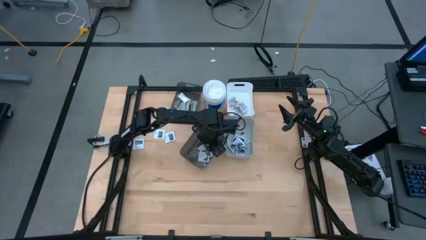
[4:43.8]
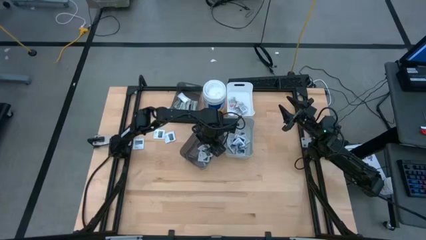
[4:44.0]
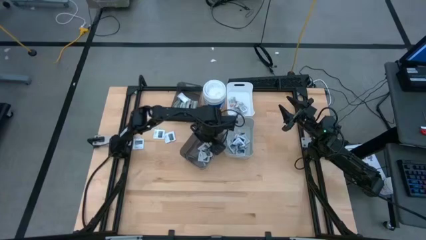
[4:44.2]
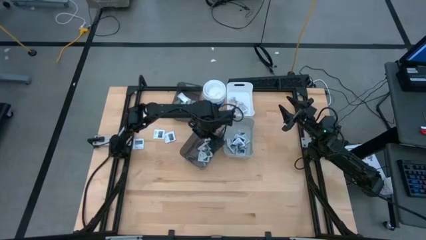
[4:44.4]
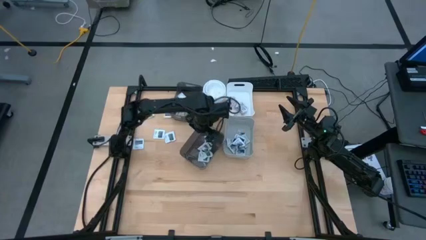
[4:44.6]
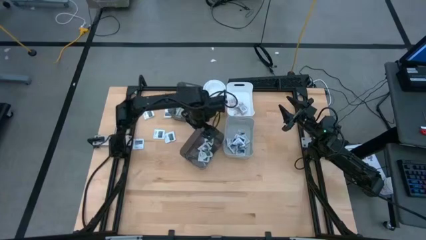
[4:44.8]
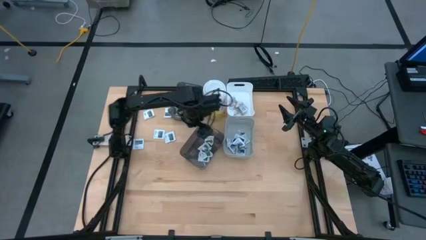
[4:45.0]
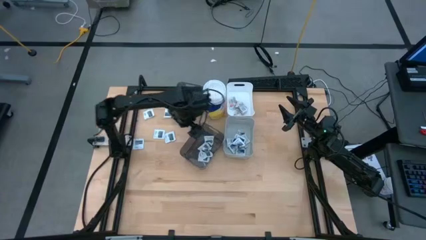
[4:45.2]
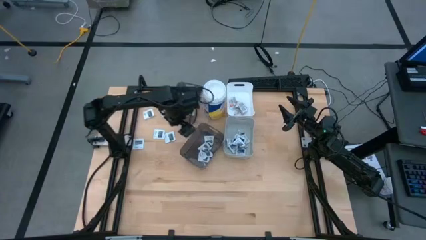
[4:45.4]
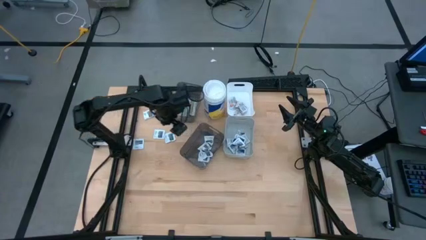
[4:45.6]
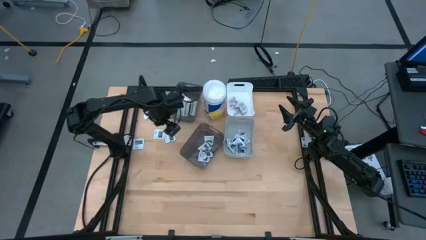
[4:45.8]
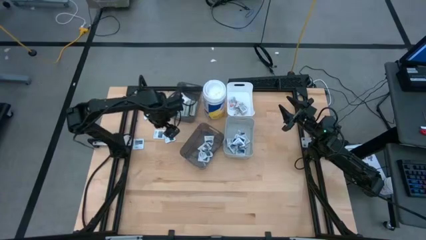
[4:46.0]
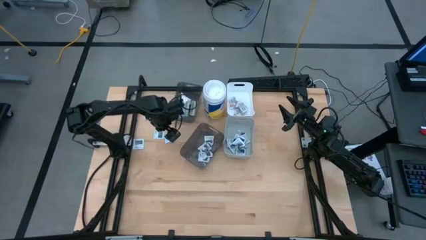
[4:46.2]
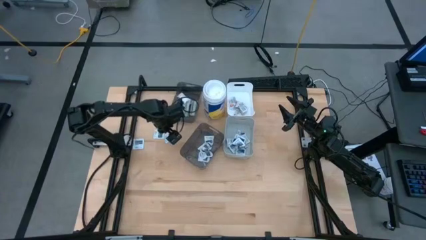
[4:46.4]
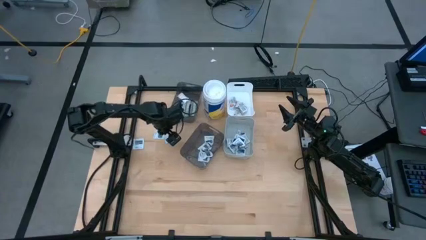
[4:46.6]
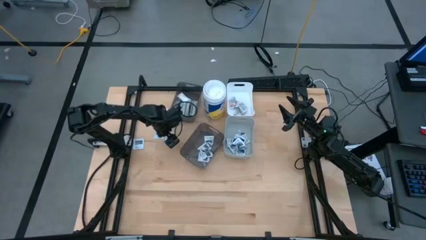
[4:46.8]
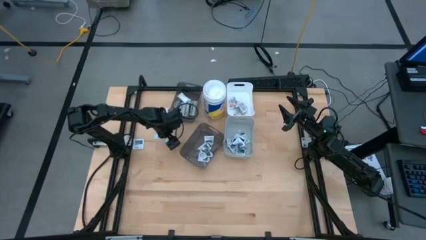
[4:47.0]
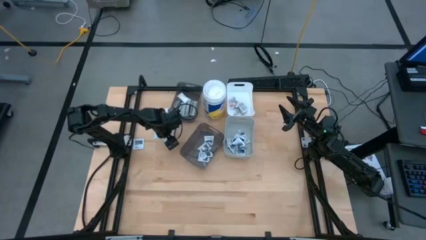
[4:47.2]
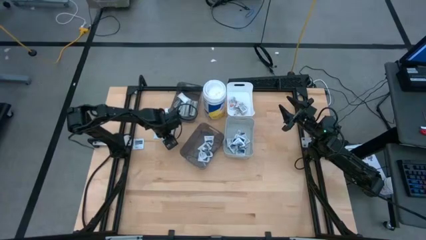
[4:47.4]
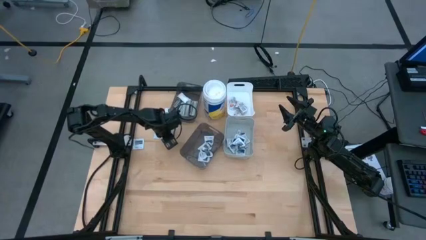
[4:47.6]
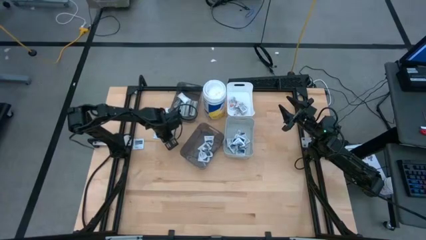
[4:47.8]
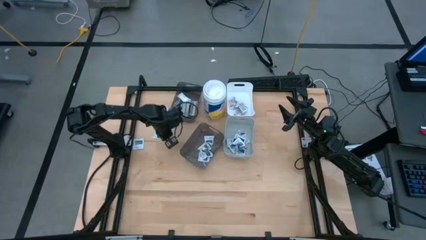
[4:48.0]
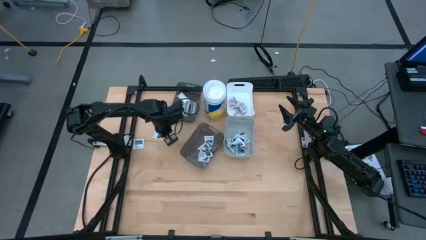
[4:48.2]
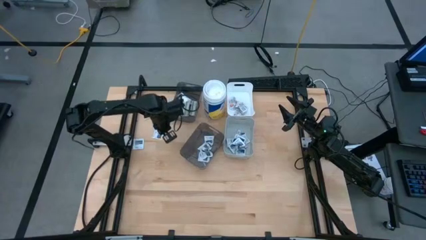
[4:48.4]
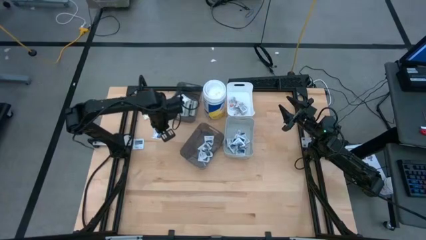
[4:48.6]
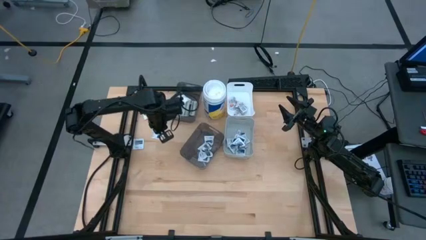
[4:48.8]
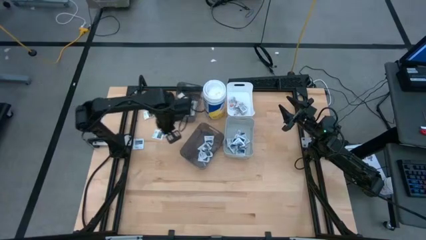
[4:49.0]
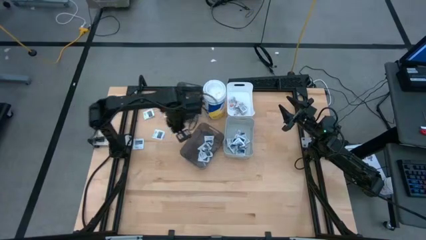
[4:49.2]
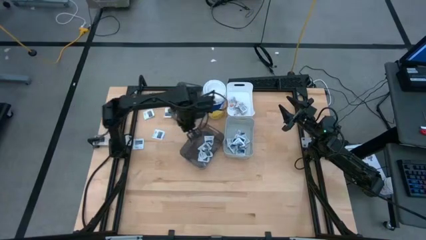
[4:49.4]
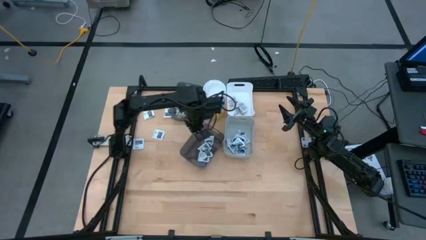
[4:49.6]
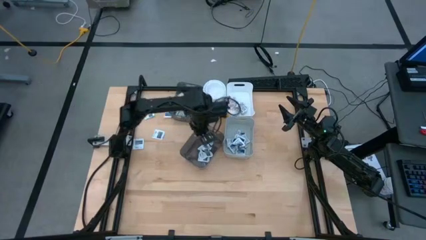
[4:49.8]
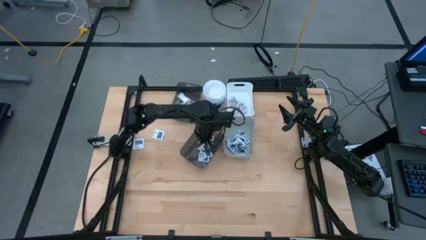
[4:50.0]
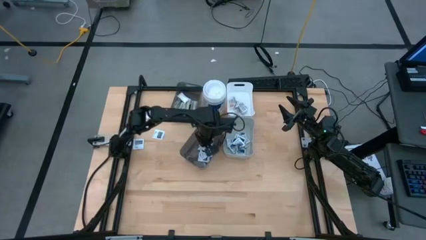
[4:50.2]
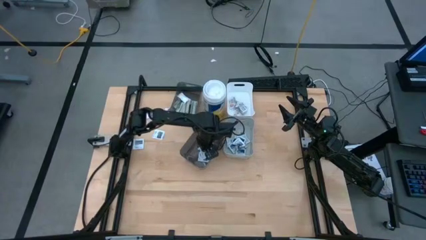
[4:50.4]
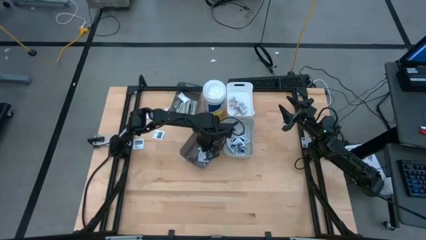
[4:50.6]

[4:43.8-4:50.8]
Task: Pick & Place First Aid Supplies
Put the towelette pack into the bottom black bin

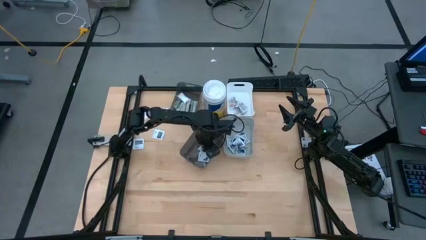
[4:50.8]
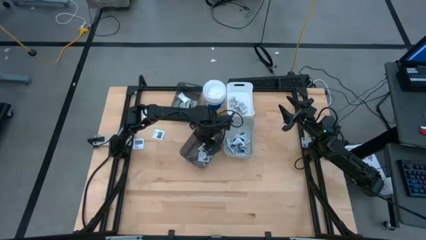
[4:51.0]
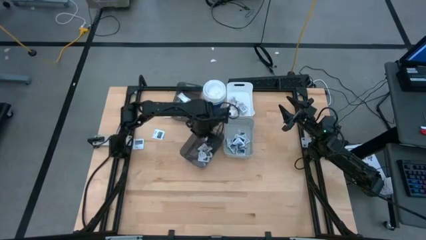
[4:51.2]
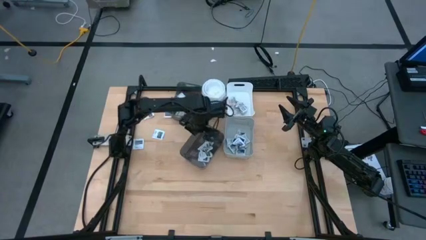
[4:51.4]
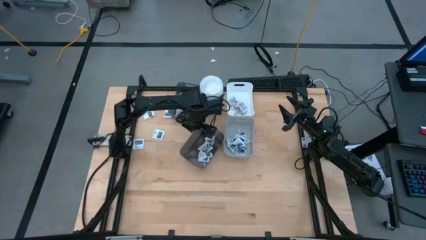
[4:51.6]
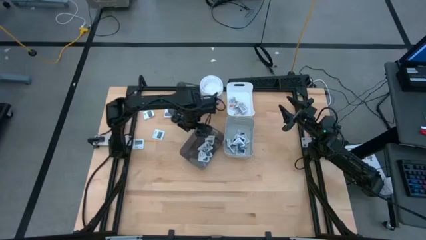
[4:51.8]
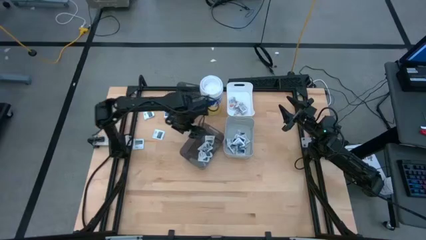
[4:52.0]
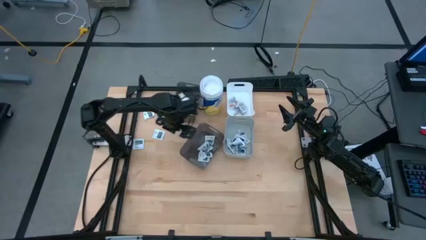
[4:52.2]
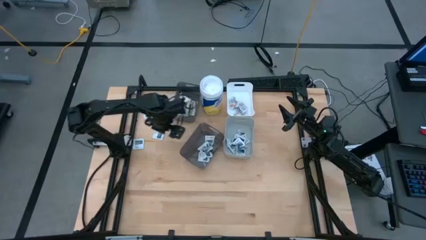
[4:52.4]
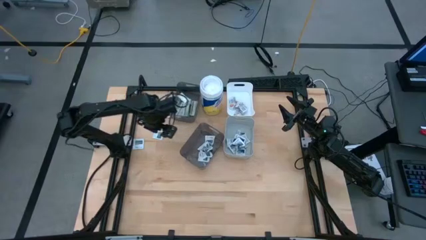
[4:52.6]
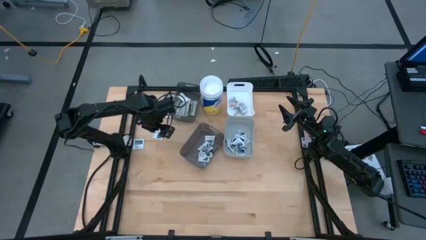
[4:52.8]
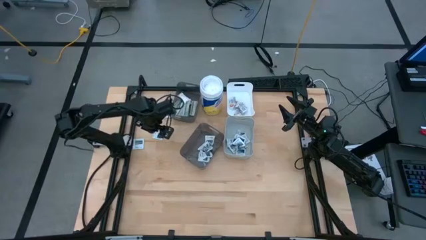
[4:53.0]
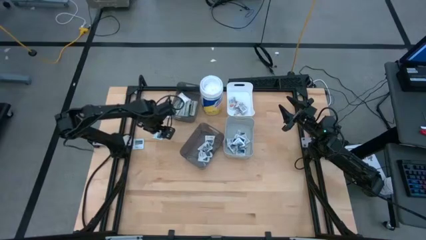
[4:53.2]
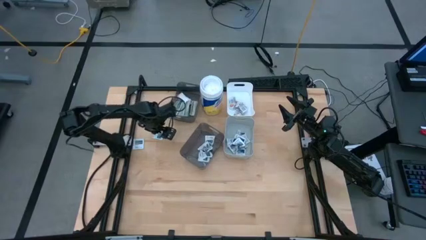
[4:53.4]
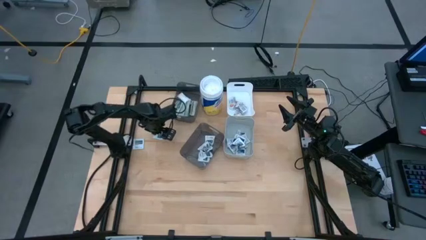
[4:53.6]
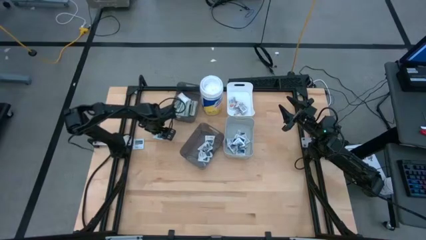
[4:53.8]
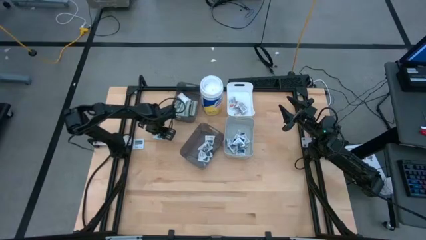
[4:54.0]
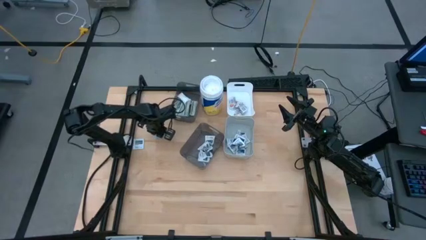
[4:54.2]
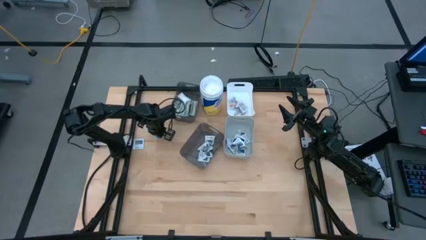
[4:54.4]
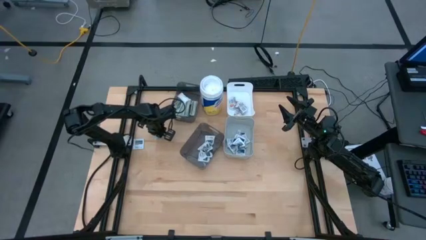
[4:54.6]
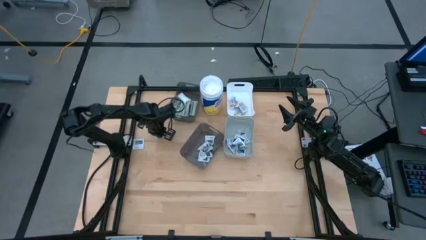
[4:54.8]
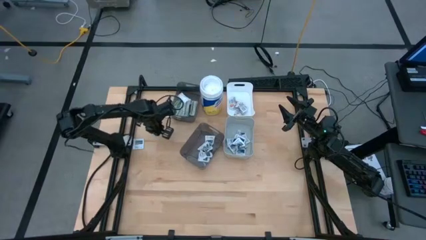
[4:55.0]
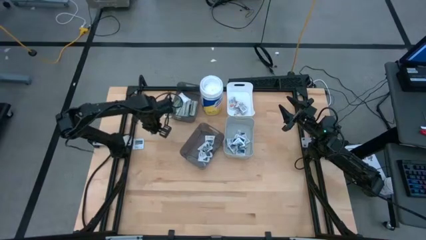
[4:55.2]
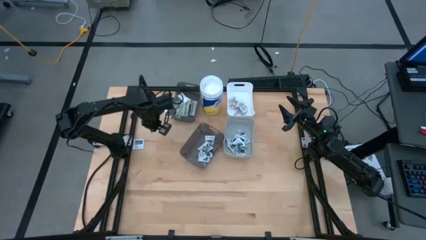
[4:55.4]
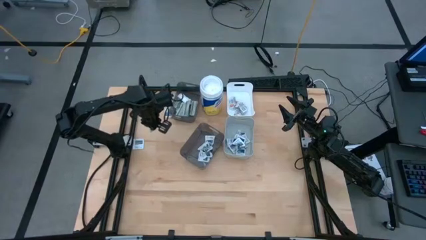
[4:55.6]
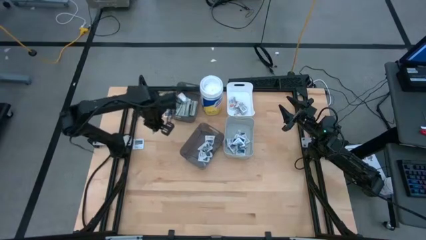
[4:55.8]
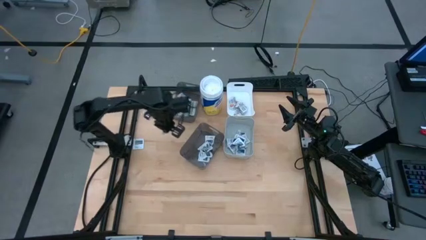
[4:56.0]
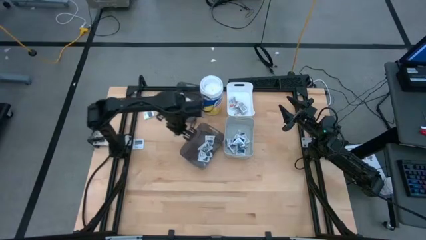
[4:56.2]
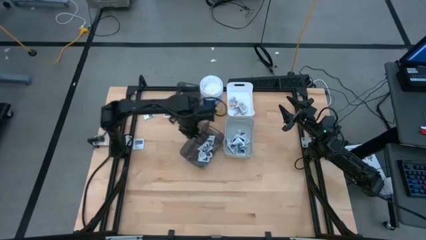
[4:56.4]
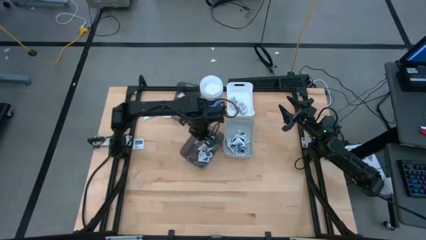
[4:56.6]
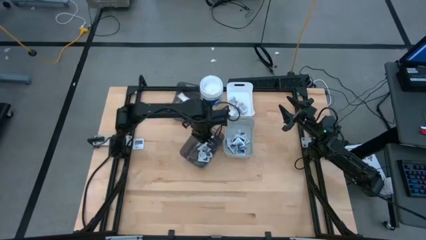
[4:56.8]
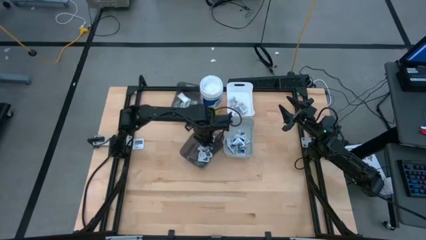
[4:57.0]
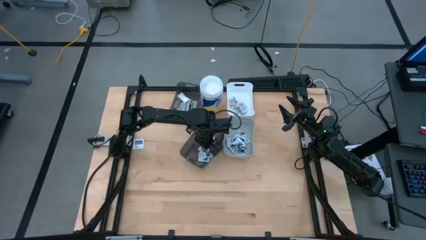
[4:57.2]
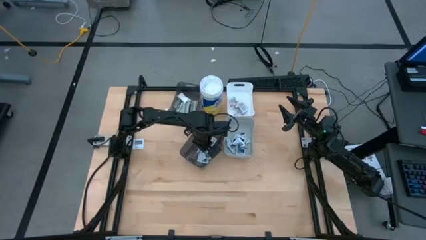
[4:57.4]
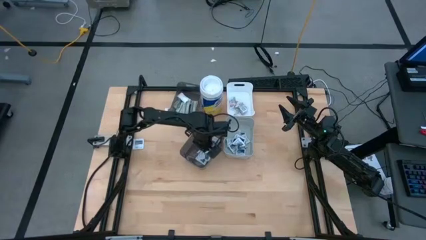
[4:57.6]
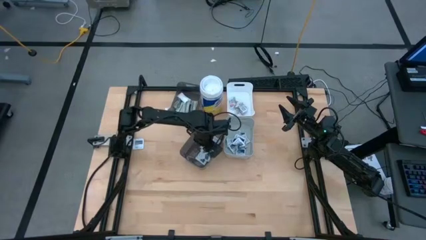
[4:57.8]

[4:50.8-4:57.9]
Put the towelette pack into the bottom black bin
